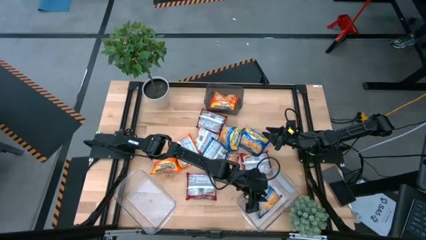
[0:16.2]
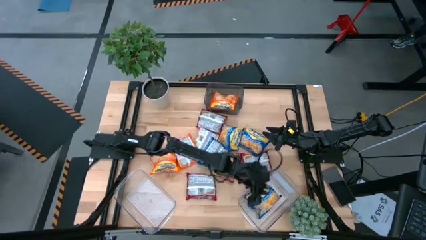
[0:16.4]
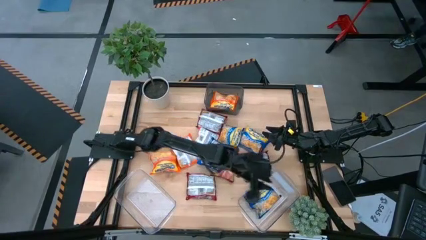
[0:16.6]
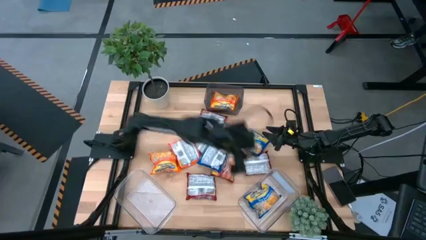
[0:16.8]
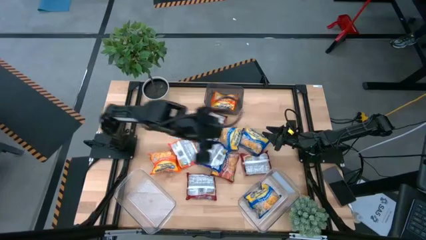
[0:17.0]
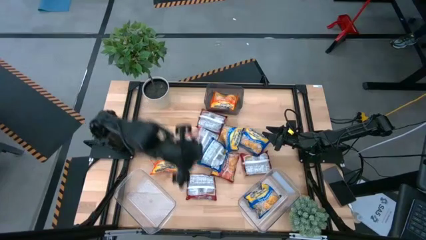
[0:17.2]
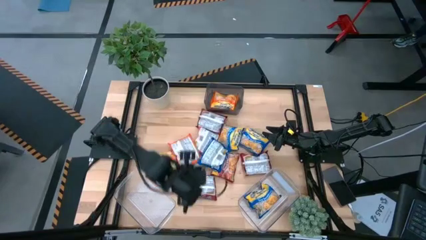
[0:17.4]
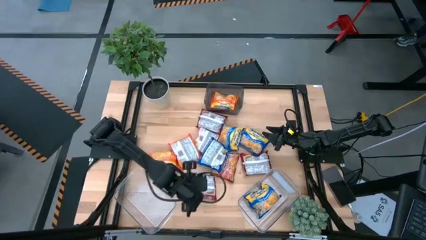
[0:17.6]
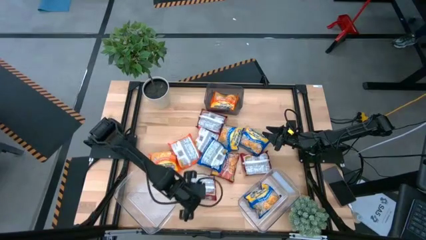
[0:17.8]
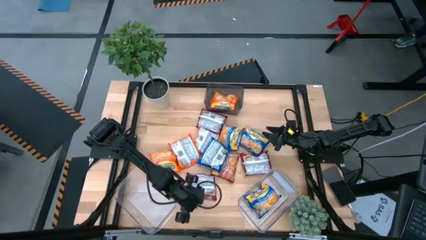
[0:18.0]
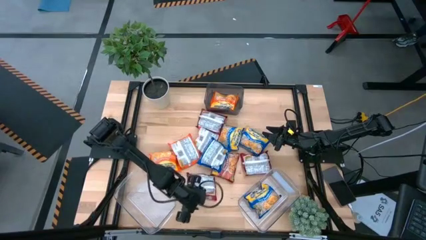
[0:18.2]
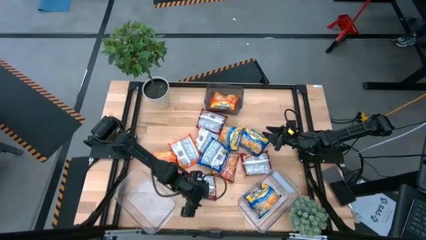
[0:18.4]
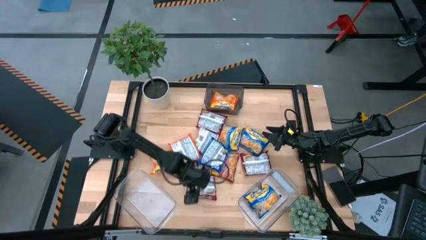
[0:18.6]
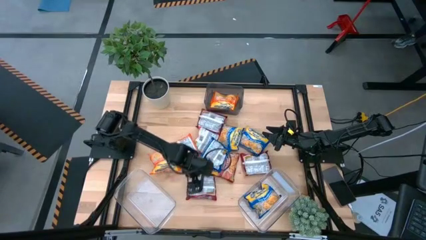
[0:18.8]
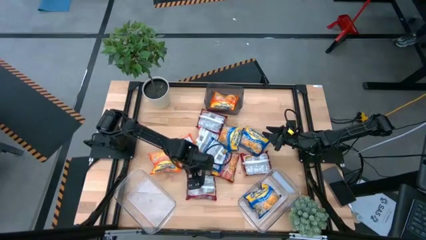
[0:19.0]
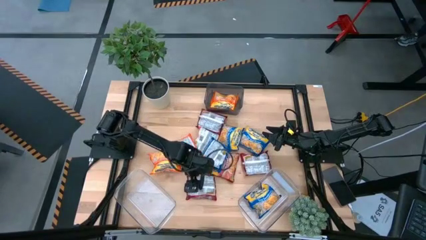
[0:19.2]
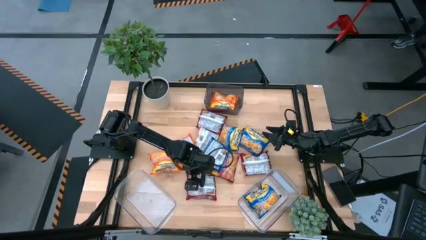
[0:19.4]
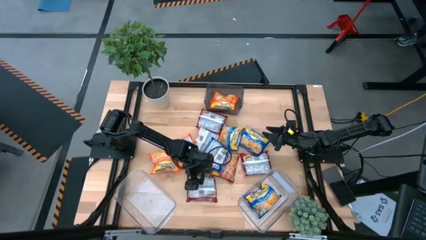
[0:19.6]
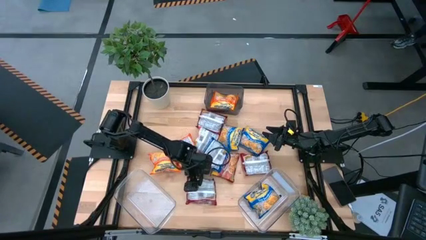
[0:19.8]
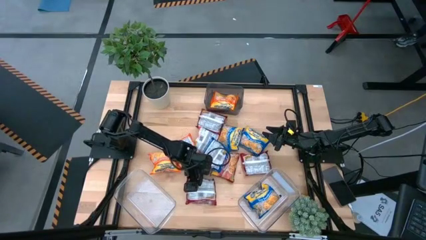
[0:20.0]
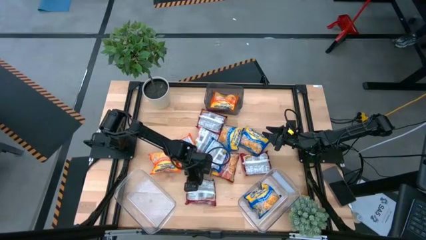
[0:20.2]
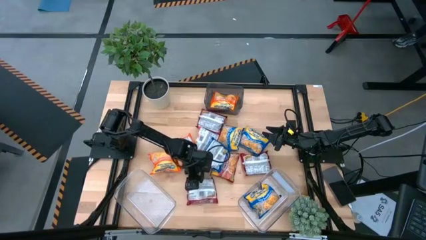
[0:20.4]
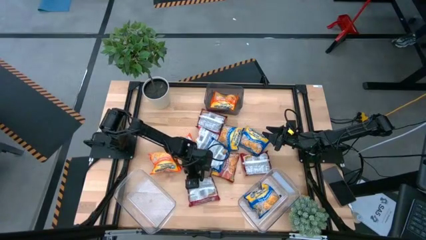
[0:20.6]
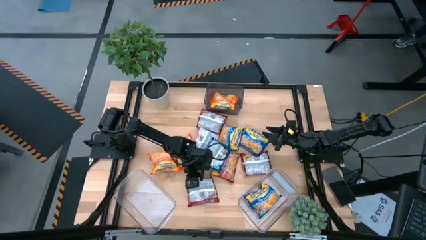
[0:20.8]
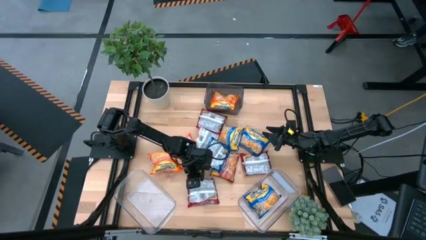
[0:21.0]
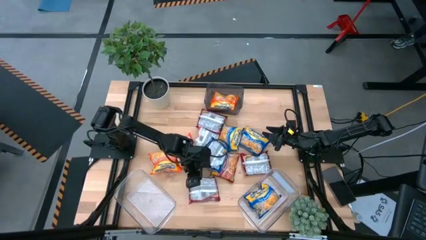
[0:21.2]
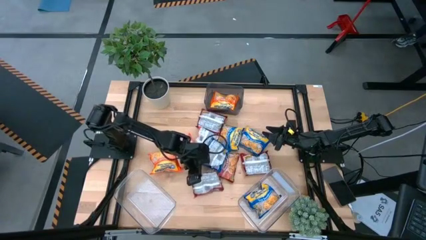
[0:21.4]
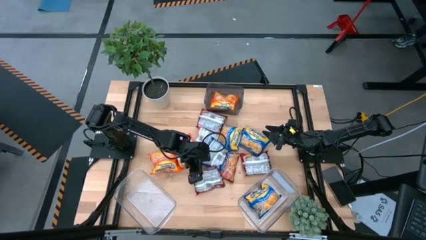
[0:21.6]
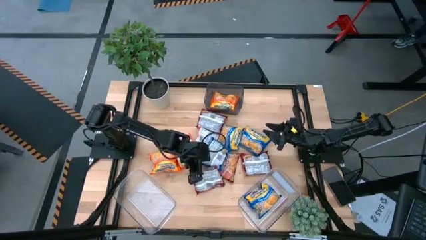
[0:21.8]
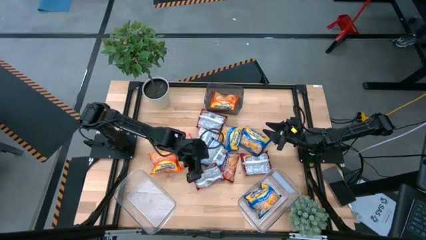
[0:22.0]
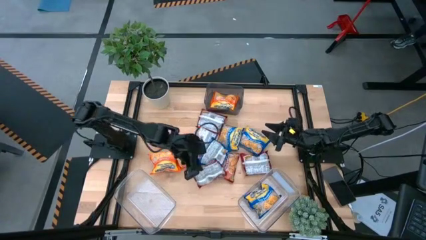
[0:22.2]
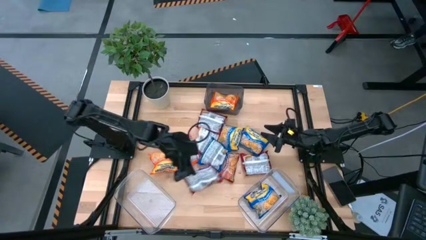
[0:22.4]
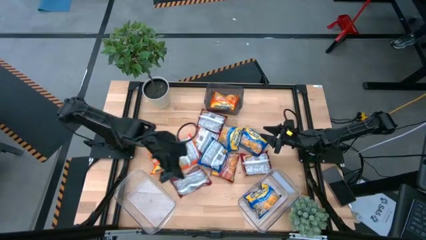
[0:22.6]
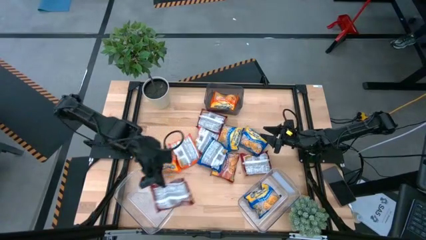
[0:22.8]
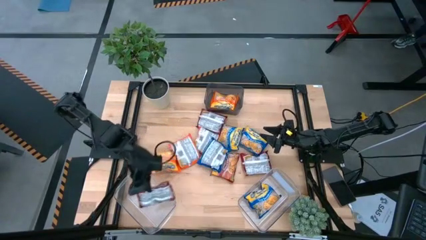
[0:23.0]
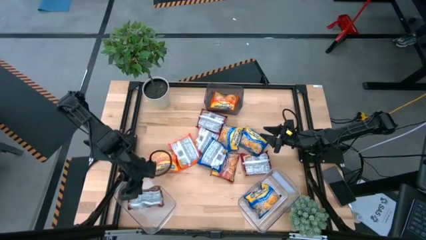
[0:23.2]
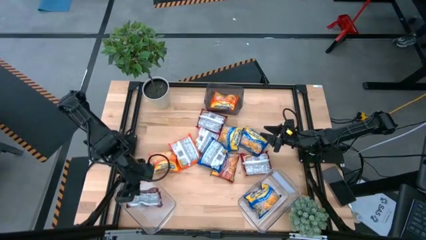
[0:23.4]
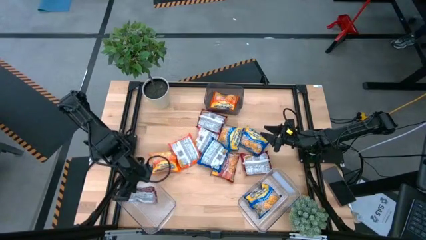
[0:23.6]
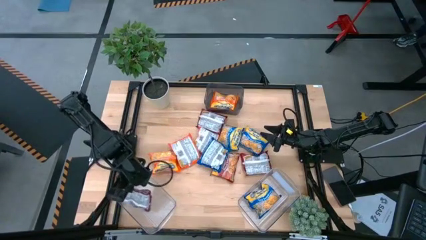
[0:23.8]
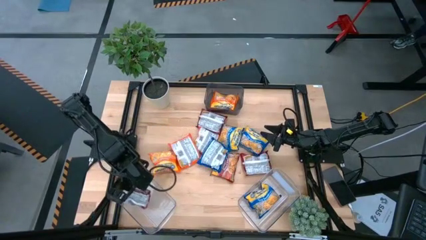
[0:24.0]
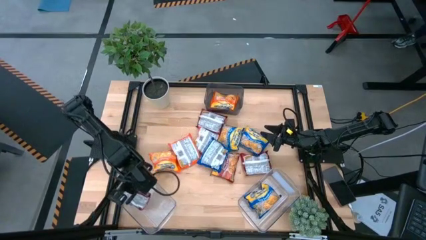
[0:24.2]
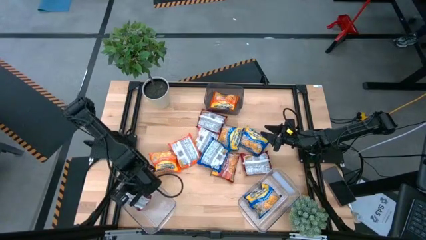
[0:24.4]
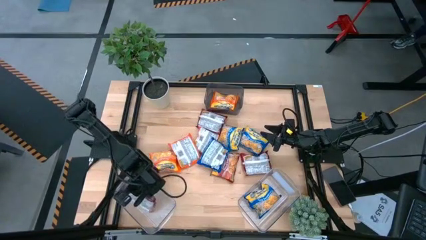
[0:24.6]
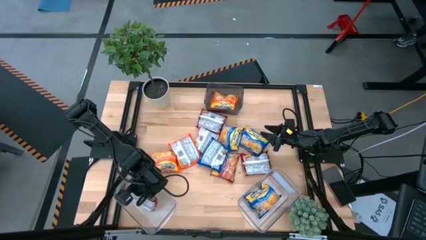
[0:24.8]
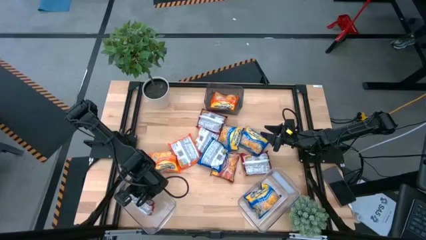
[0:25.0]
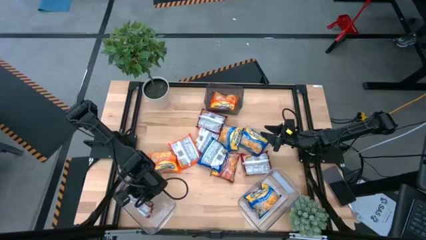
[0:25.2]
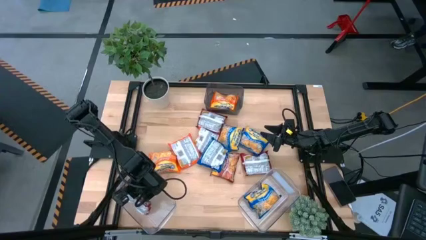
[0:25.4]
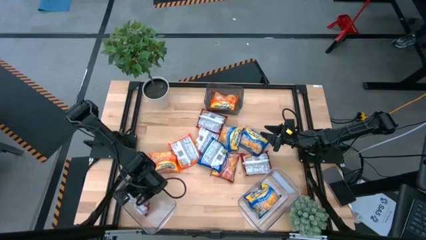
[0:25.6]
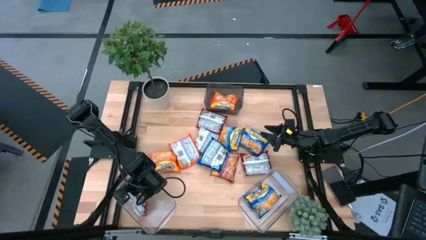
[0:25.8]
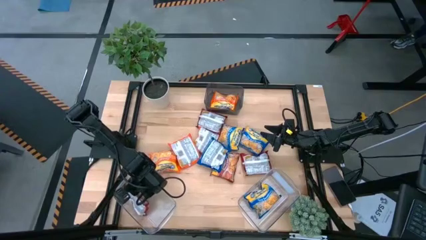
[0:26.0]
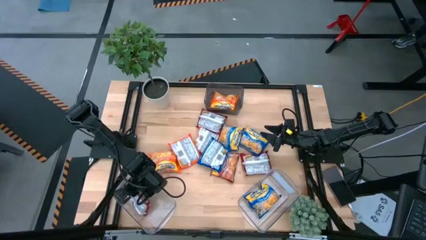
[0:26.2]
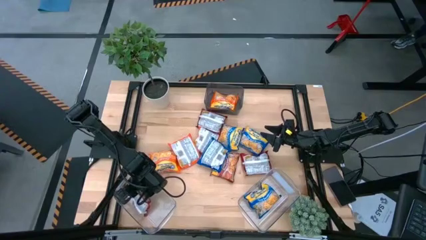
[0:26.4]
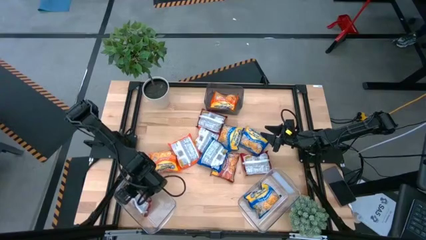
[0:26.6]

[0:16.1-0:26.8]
Task: Sort Maruchan noodles
Put the red noodle pack into the left transparent bin

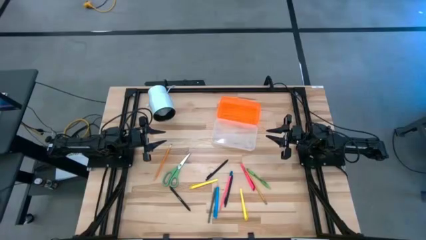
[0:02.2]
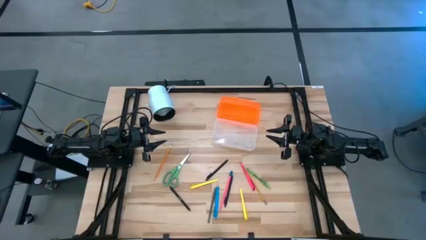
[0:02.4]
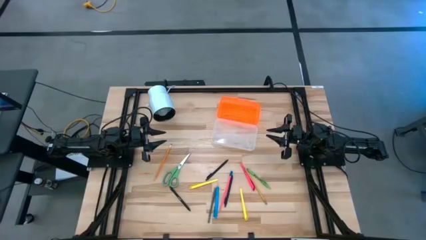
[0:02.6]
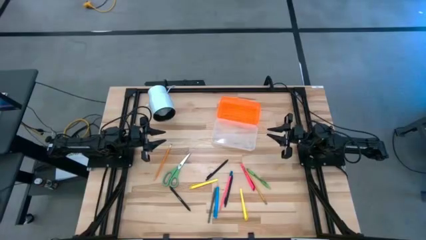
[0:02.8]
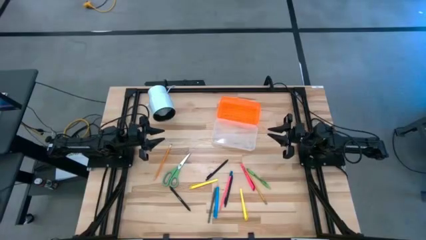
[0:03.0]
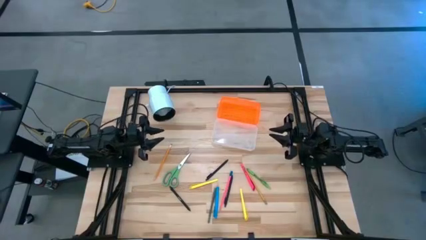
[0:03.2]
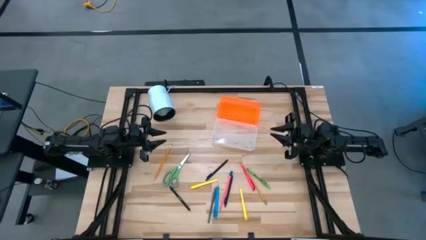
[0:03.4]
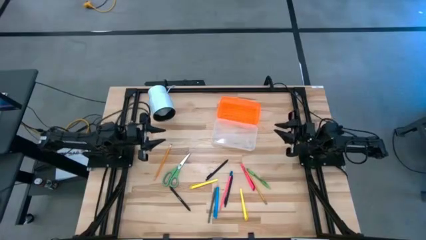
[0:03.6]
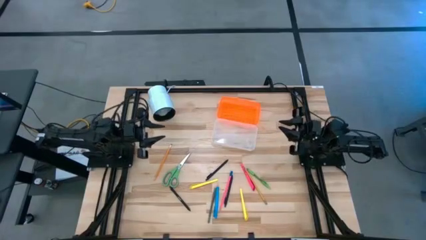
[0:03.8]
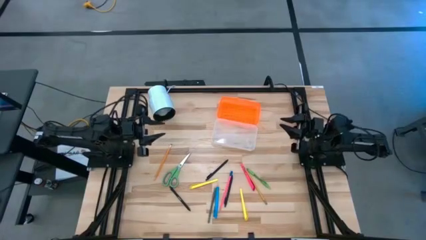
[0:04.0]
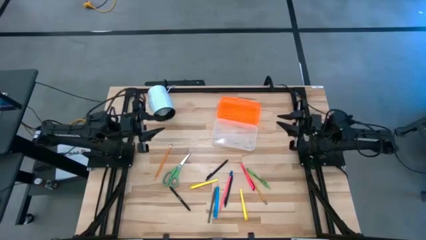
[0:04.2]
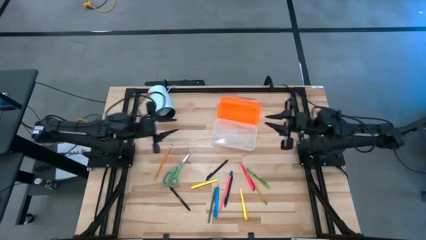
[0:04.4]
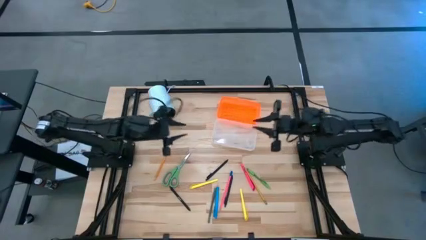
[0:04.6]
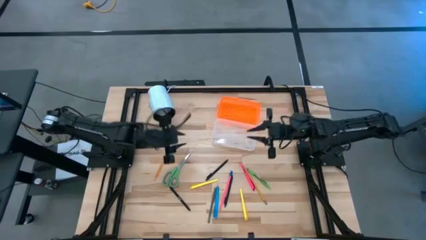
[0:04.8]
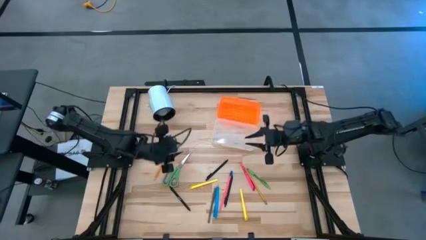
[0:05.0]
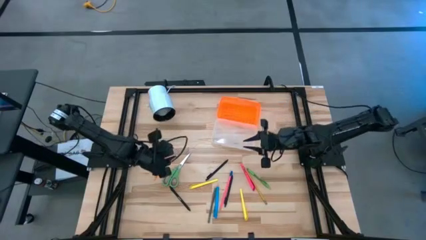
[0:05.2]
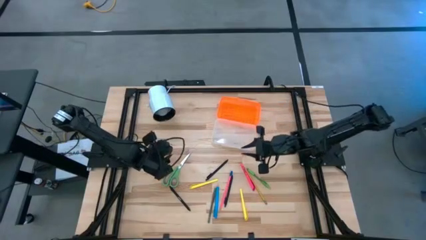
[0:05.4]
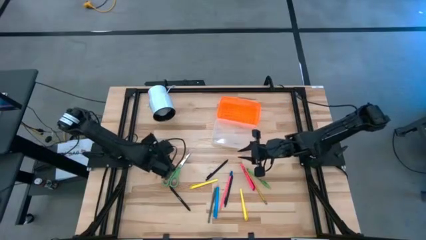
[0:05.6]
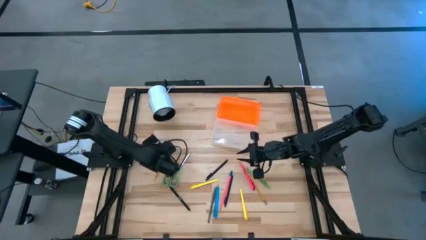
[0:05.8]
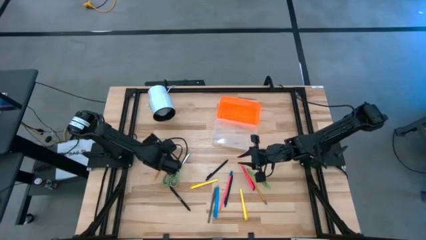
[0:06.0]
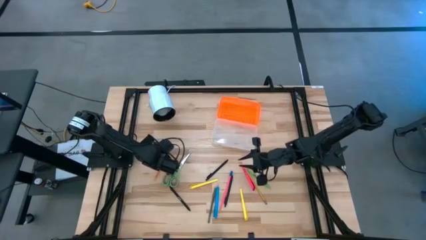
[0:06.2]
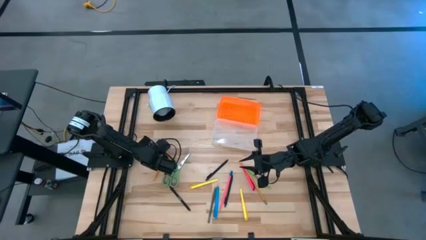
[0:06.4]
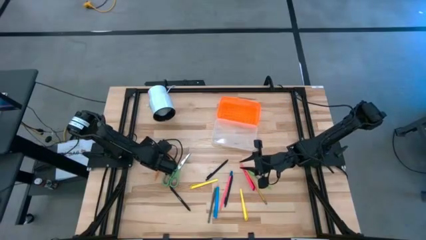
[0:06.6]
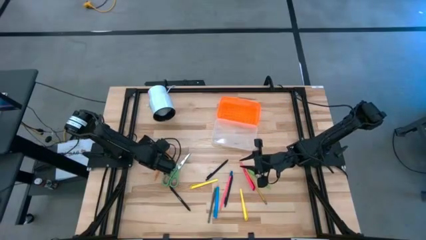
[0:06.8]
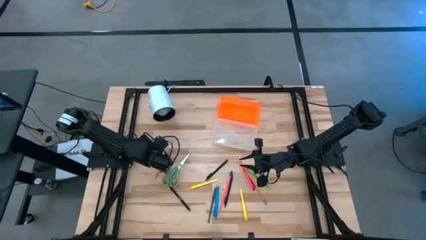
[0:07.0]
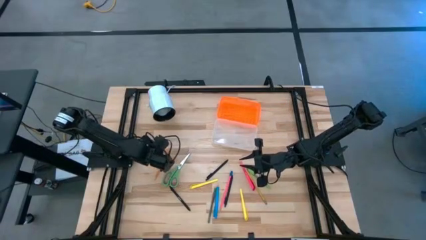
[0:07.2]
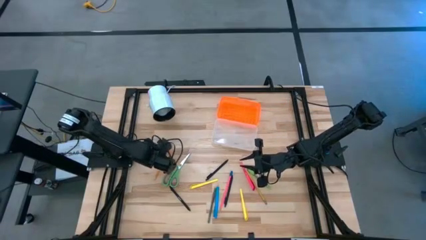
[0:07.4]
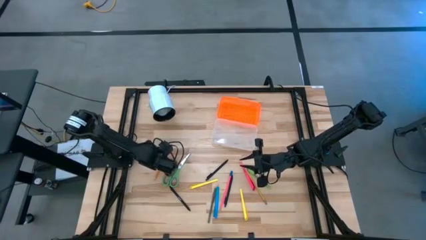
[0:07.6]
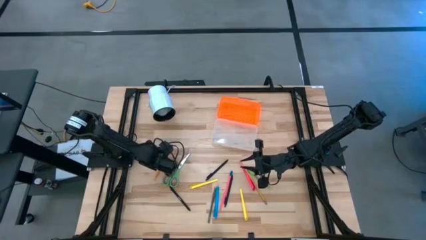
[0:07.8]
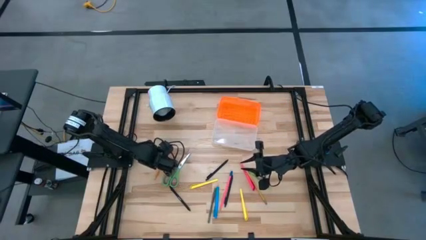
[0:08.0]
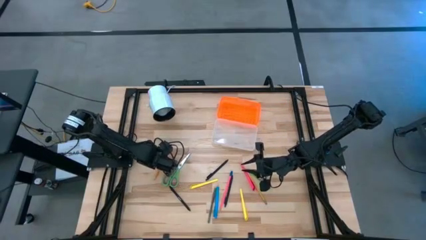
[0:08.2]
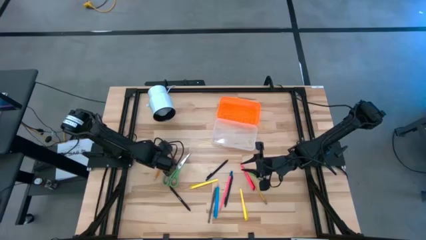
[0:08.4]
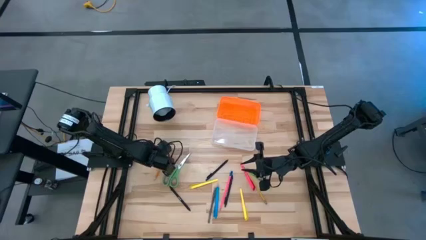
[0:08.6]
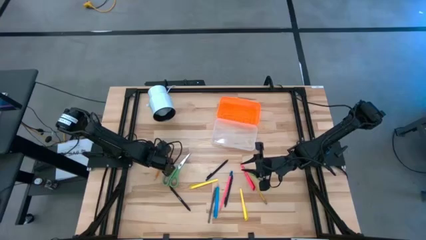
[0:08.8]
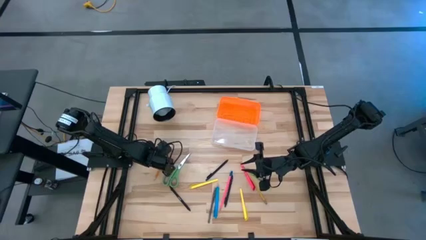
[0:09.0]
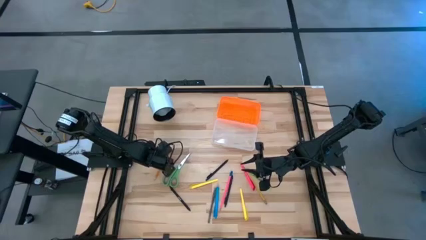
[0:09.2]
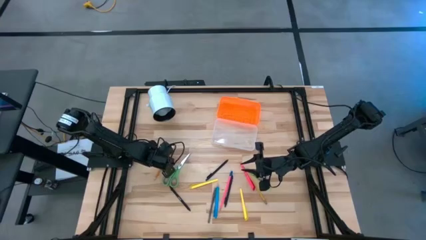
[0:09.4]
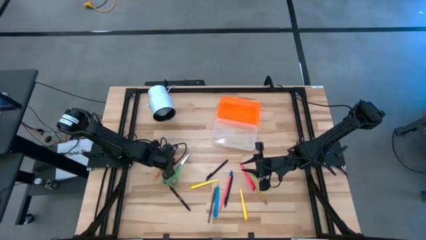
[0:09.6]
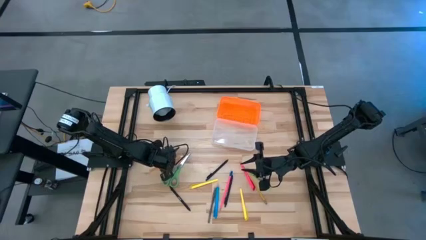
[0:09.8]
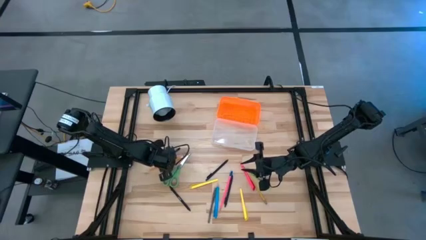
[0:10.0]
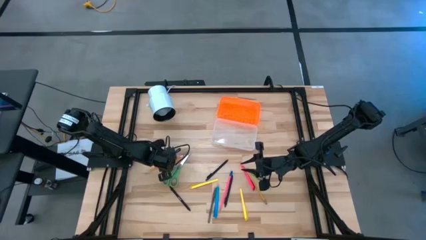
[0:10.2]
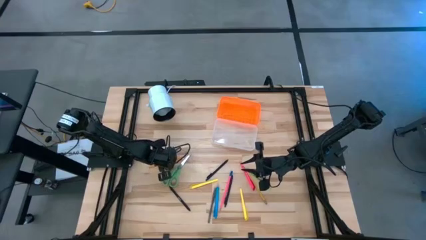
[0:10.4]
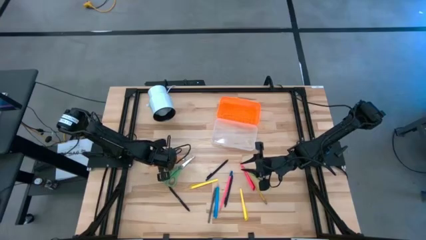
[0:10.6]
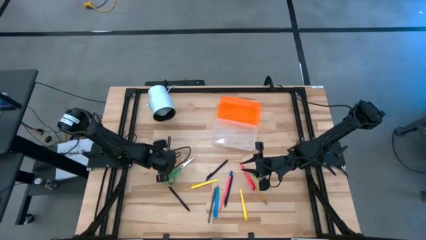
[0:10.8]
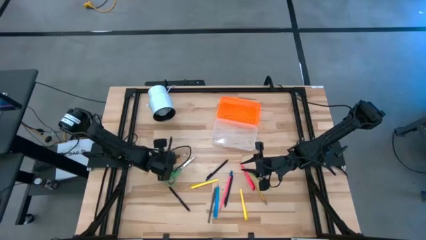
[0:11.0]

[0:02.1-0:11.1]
Task: Pick & place school supplies into a supply box
Put the orange pencil into the supply box
